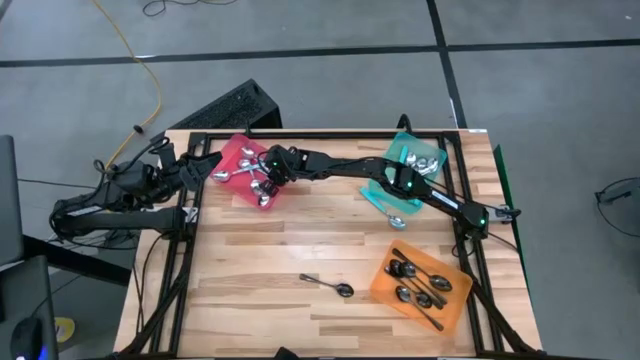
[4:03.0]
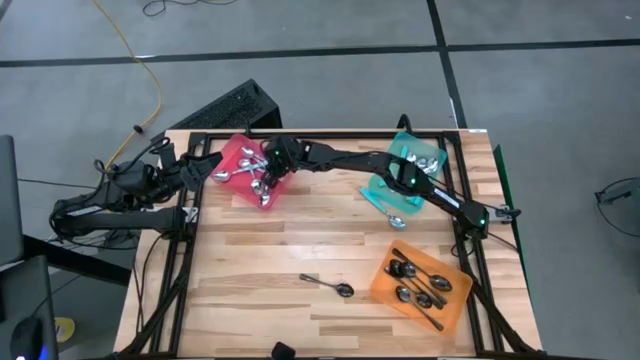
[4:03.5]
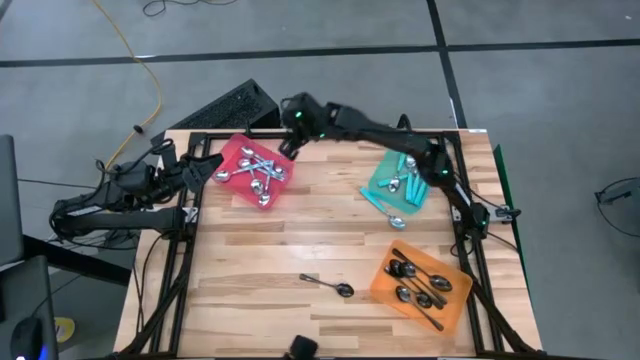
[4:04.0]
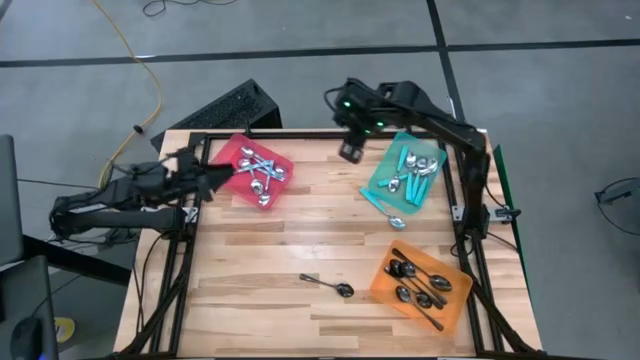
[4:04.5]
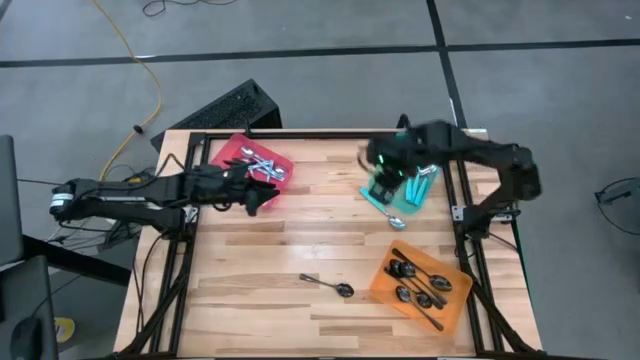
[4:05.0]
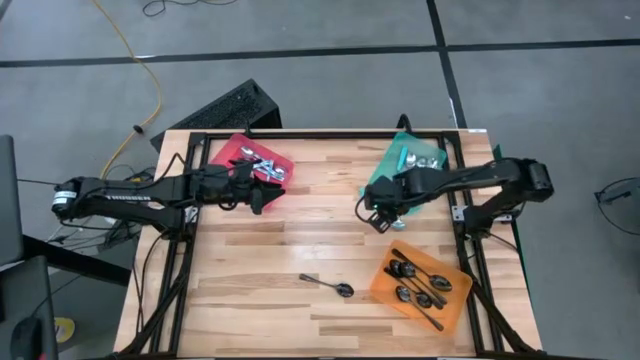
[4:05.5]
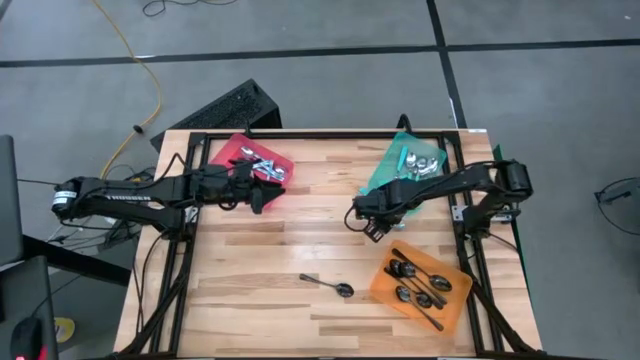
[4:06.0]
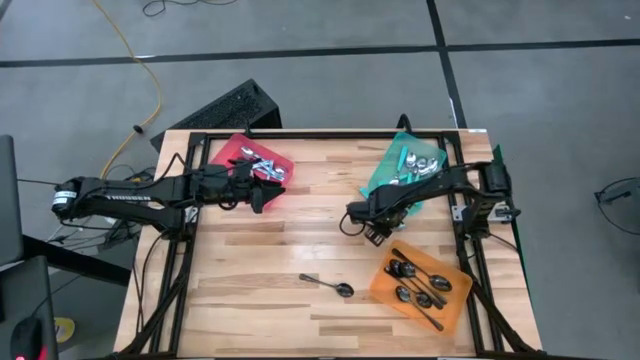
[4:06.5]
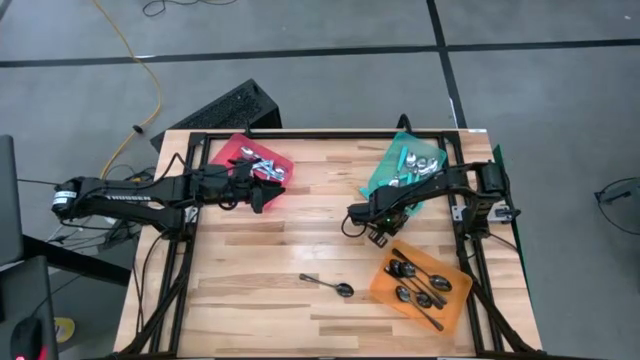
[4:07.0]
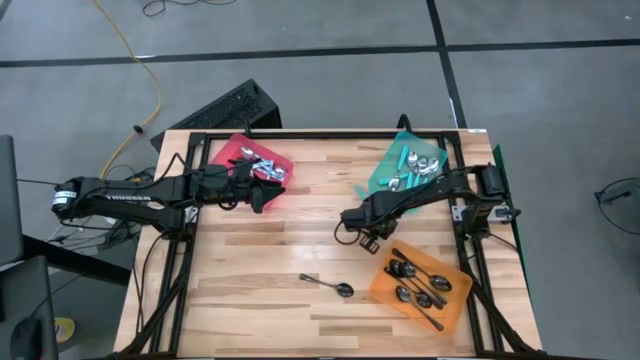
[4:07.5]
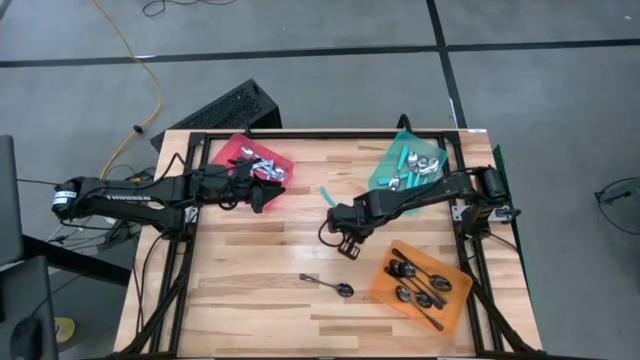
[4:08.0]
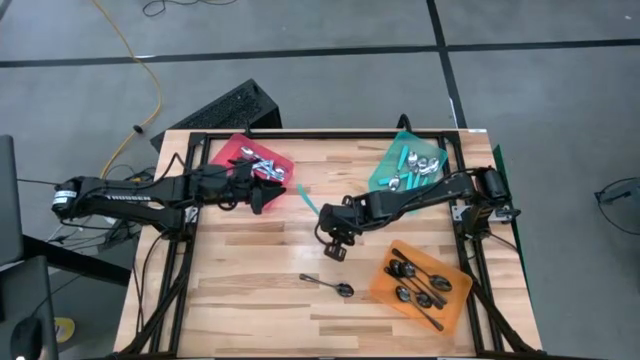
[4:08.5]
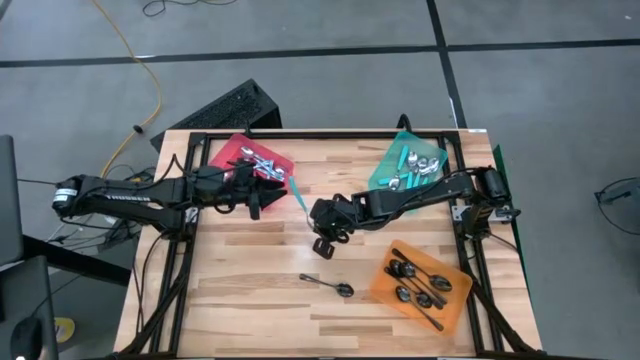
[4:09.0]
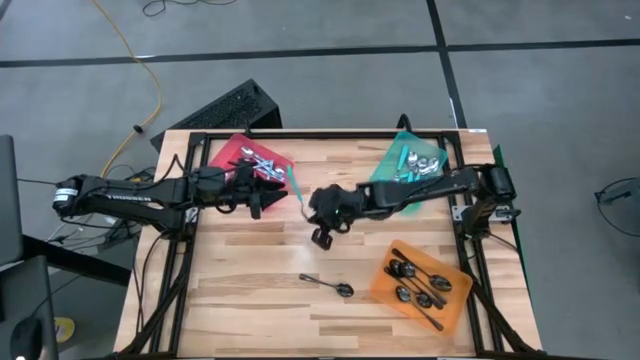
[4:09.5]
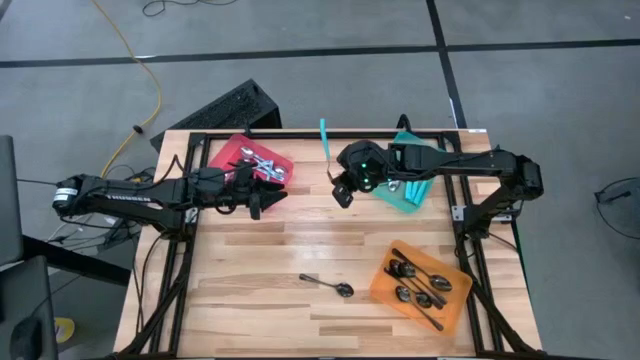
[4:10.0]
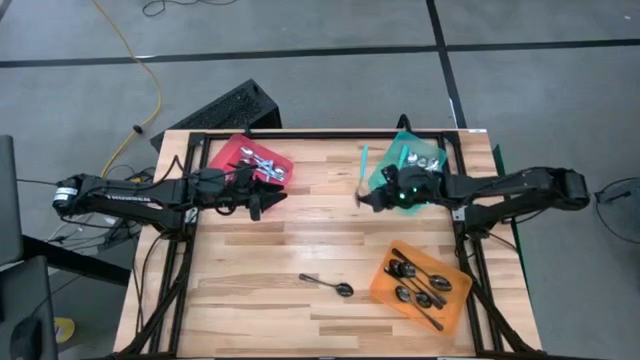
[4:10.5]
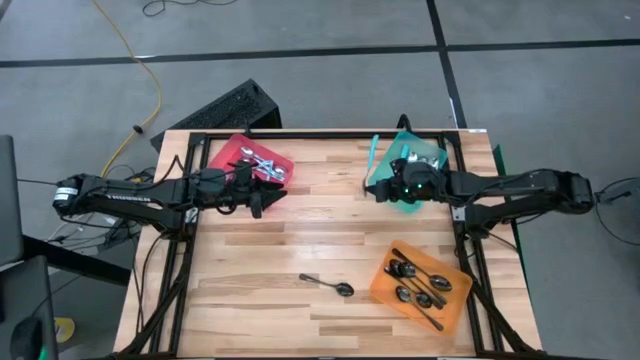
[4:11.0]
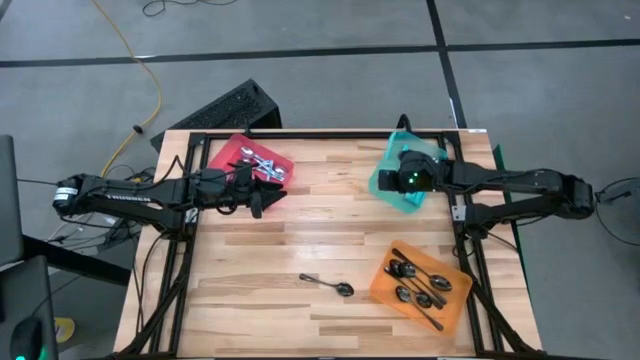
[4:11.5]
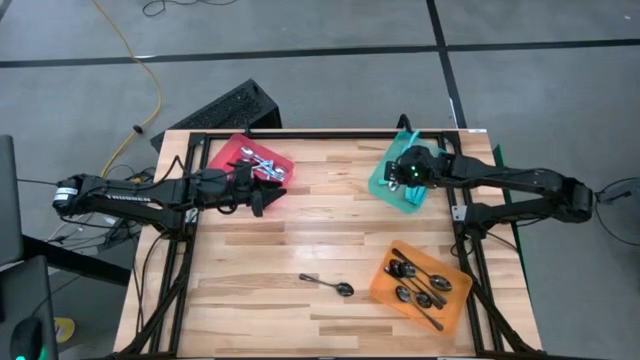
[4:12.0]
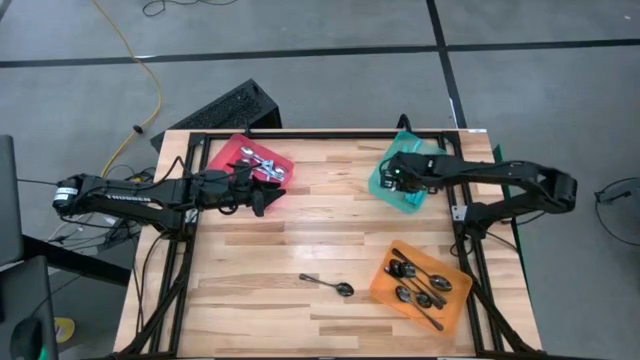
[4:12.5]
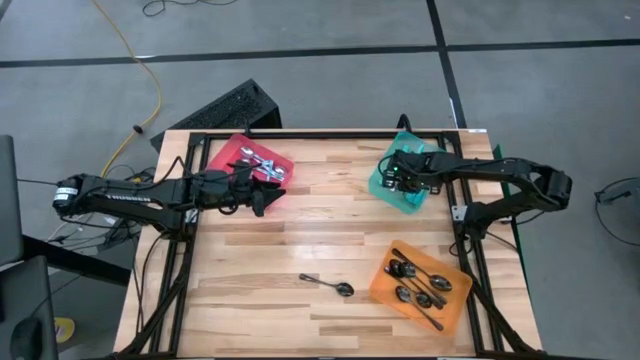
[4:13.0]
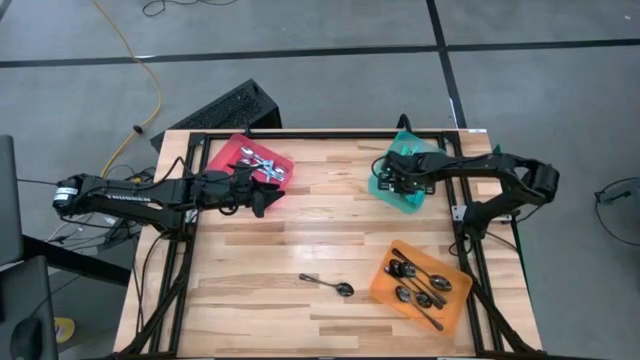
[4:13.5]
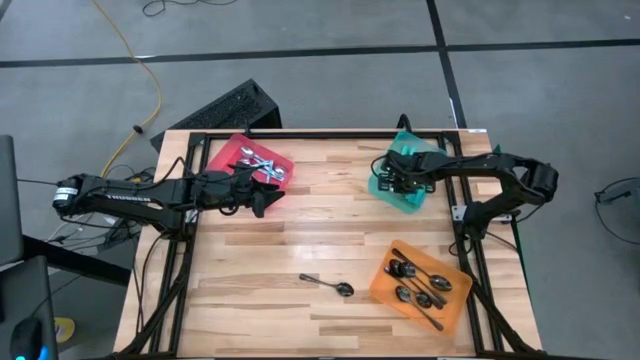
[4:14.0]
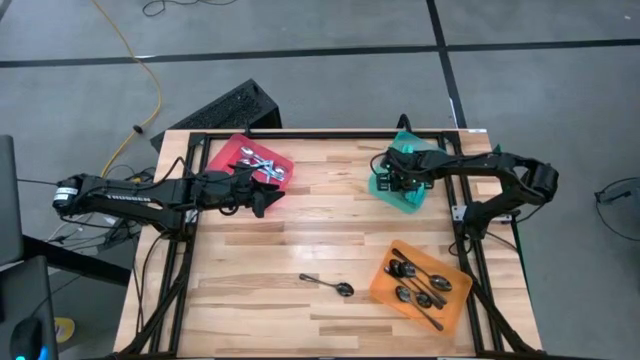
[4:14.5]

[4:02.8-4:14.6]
Task: Sort silverware by color (type)
Put the blue spoon into the blue bin

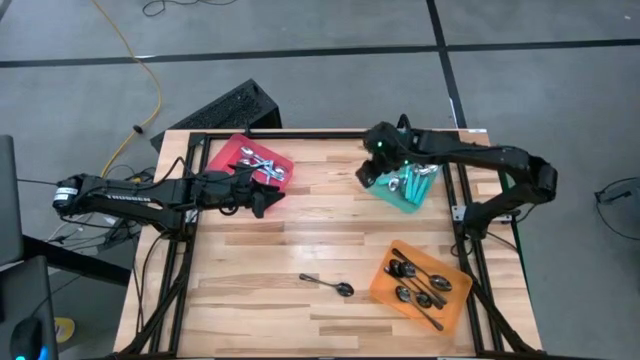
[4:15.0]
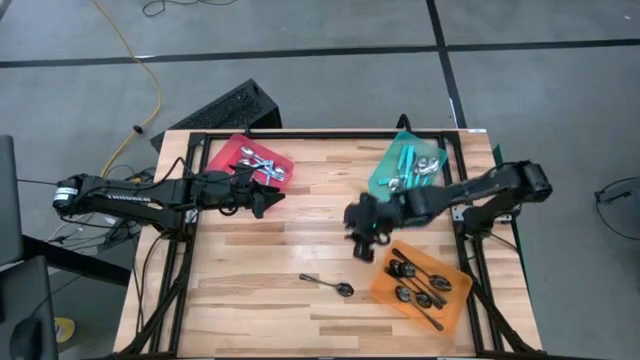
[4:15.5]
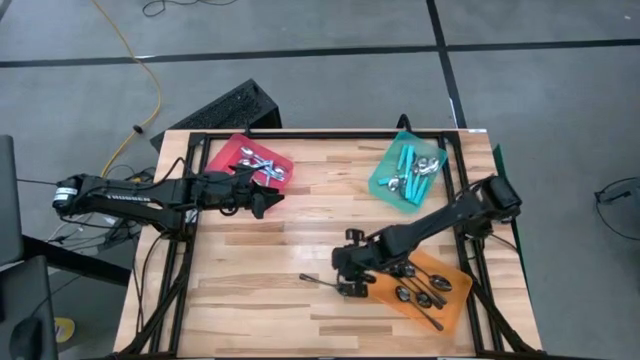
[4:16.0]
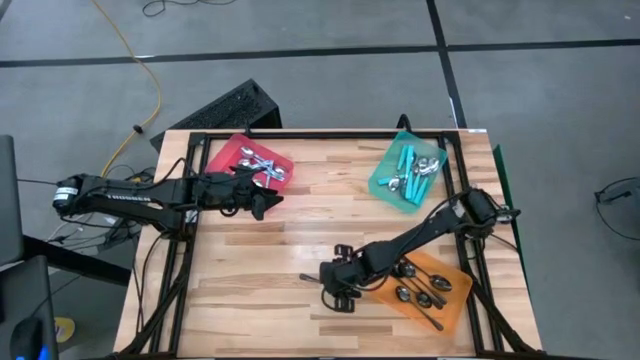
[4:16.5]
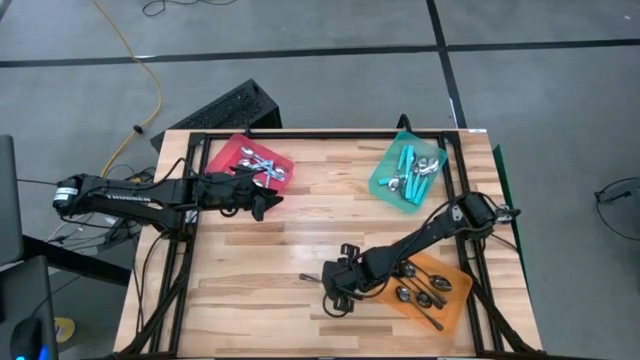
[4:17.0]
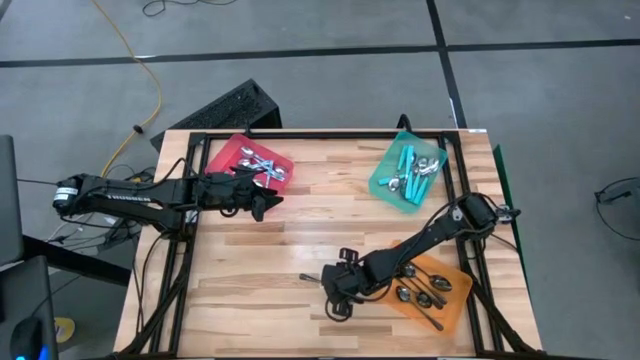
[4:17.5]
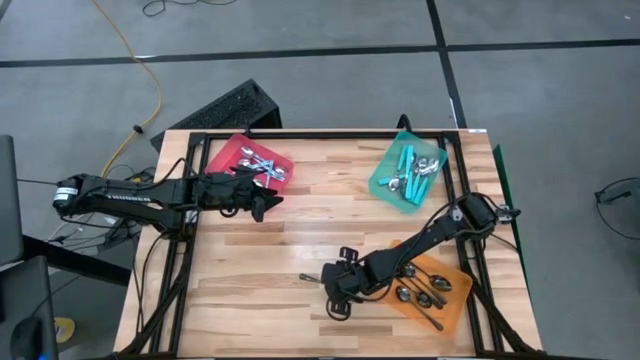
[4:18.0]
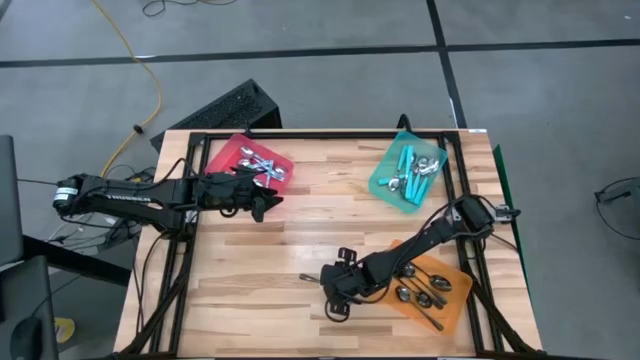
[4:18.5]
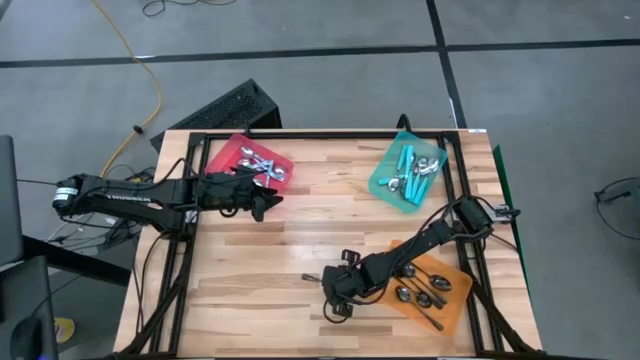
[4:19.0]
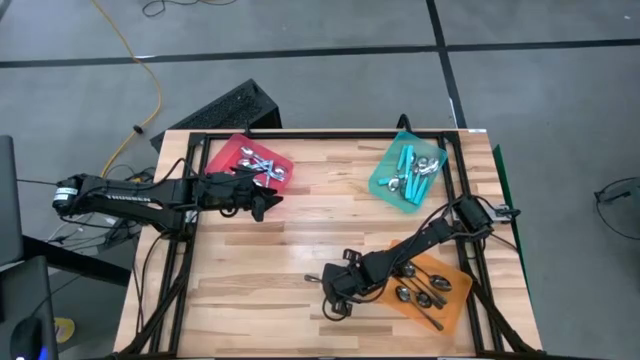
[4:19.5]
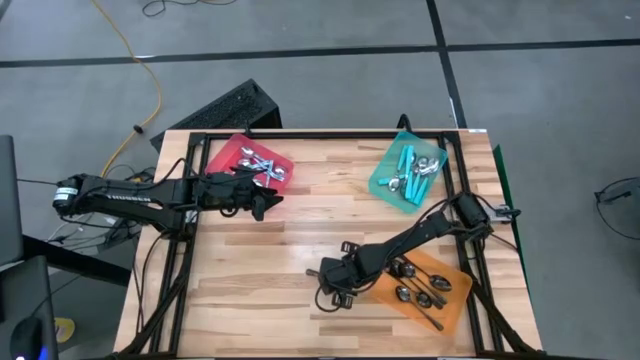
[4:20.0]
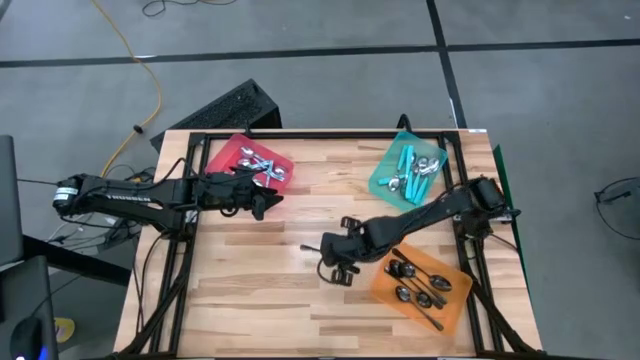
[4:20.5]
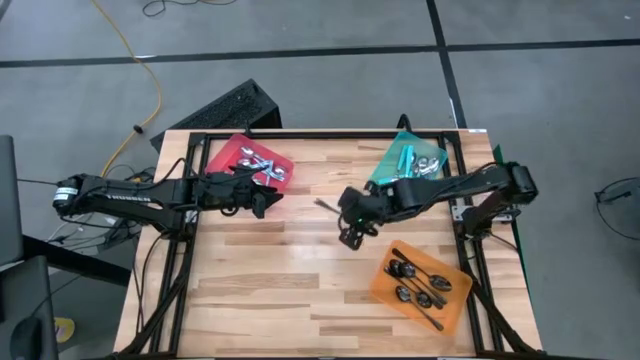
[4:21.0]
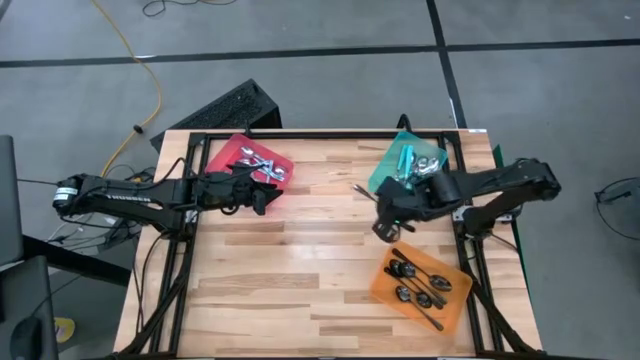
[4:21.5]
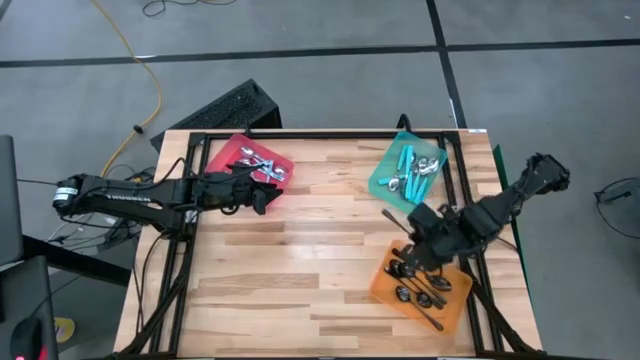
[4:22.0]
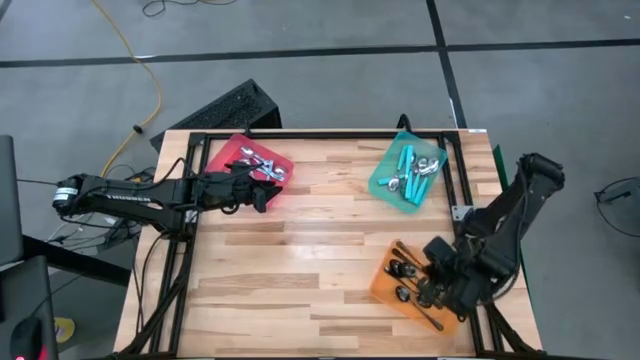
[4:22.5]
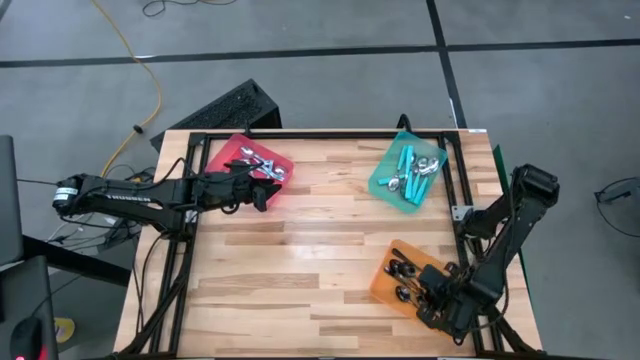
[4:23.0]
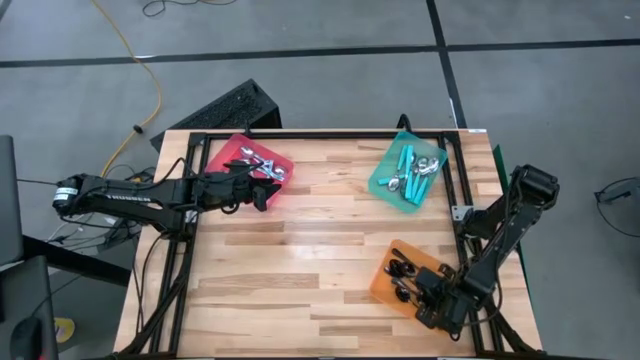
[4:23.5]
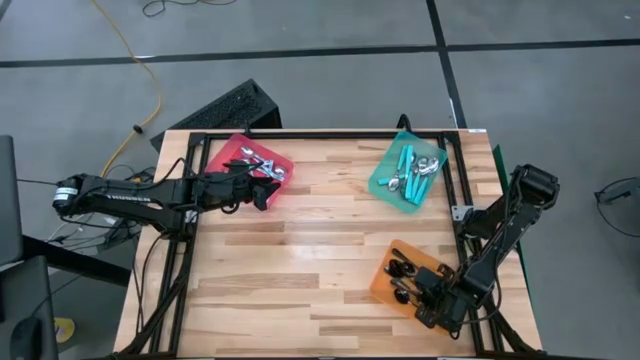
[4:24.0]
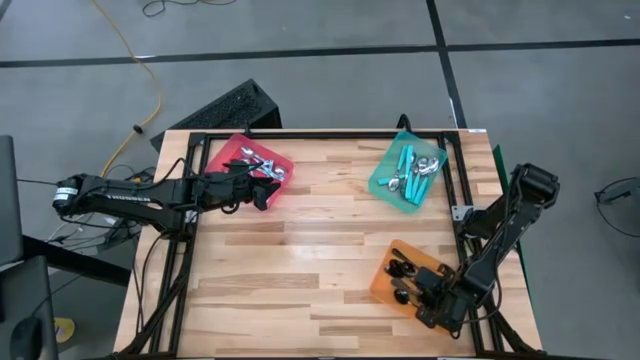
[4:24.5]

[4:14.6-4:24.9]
Put the black spoon into the orange bin
